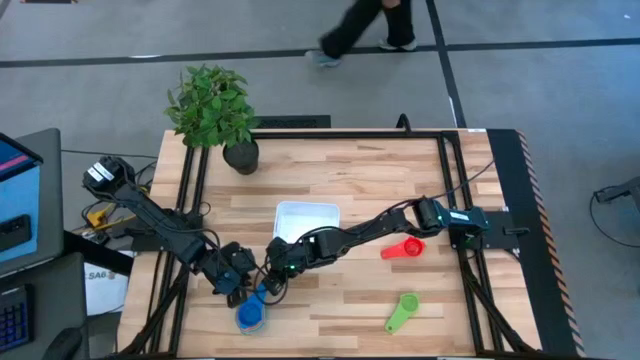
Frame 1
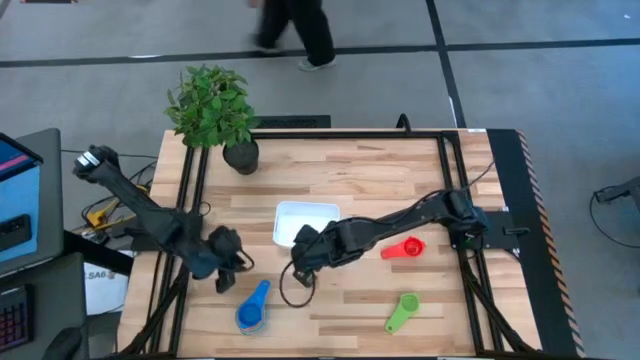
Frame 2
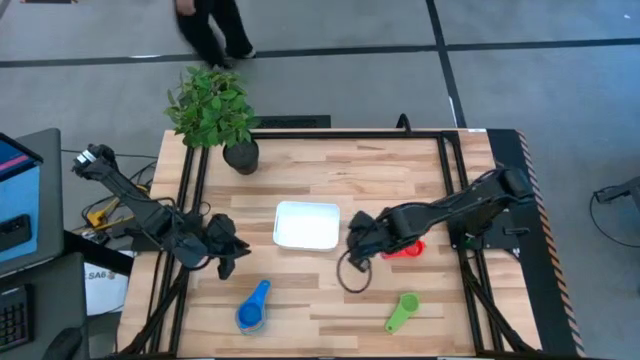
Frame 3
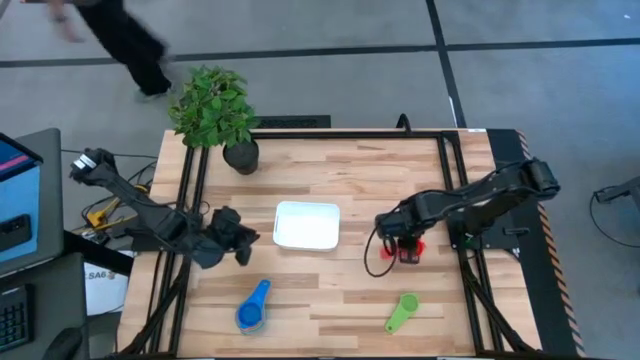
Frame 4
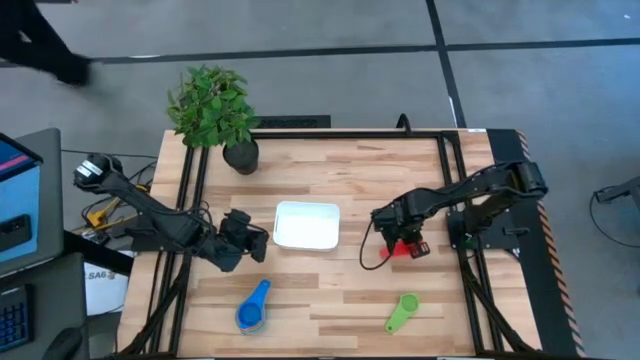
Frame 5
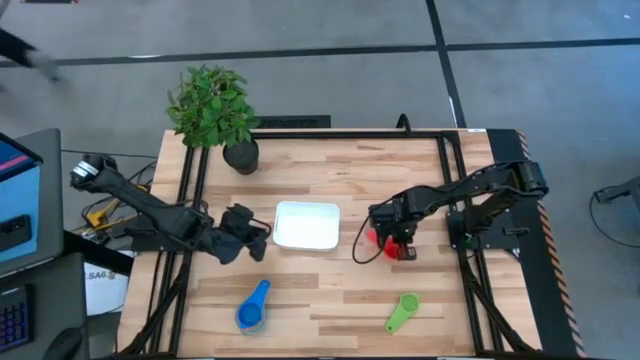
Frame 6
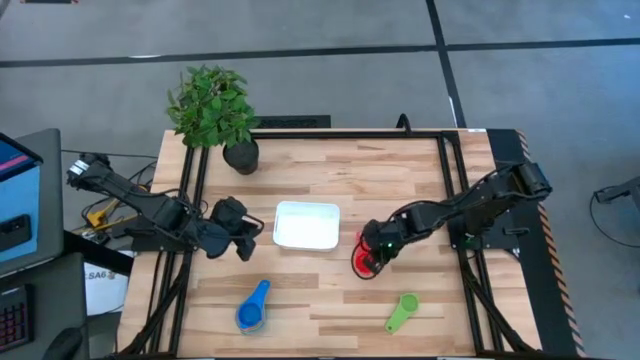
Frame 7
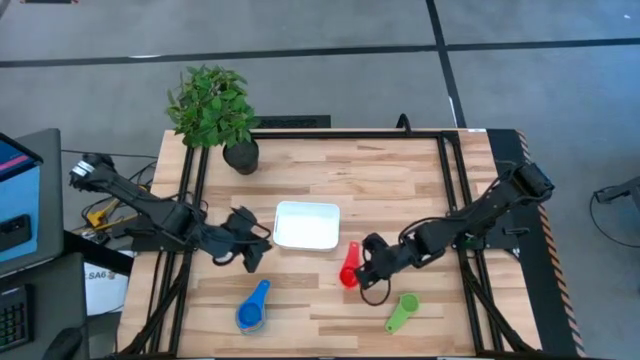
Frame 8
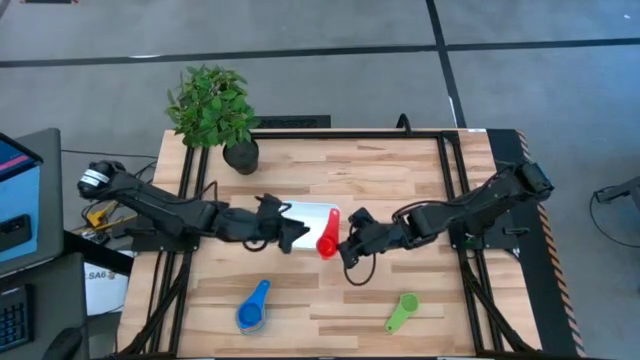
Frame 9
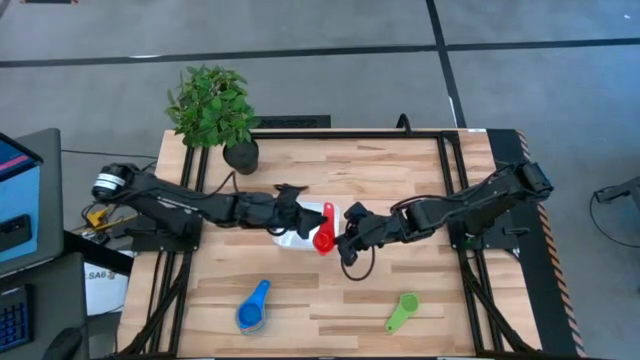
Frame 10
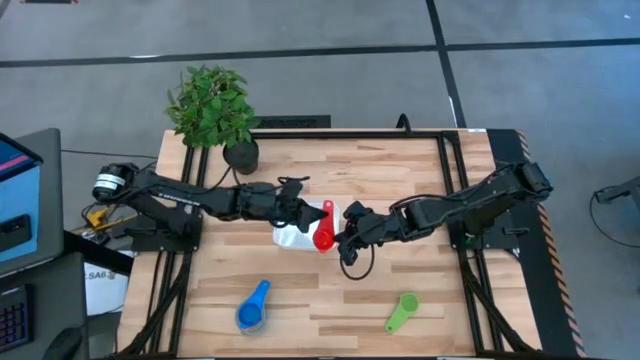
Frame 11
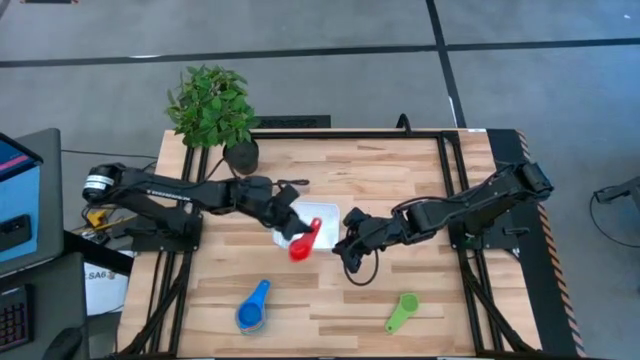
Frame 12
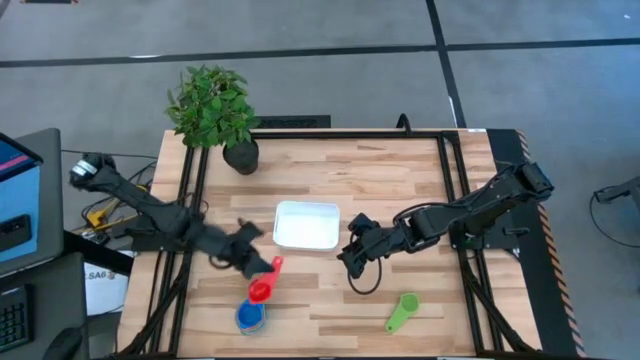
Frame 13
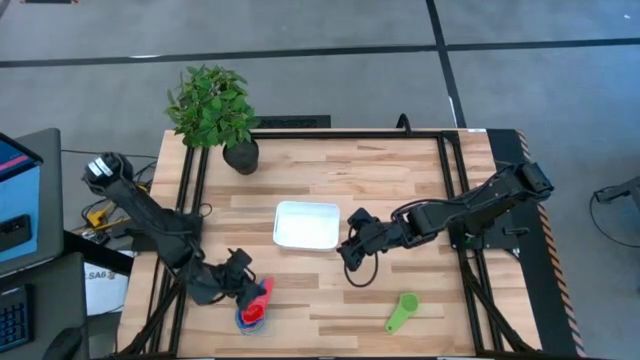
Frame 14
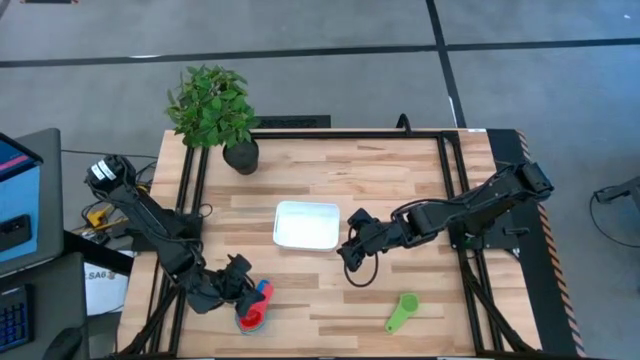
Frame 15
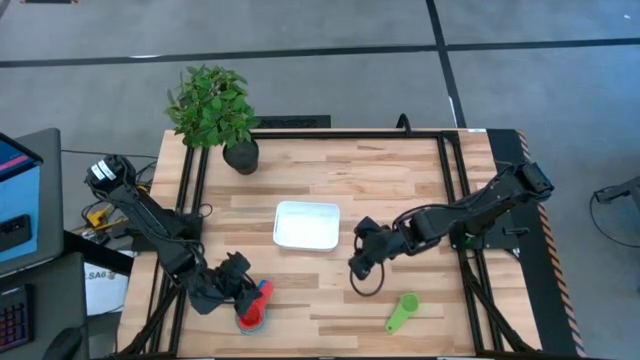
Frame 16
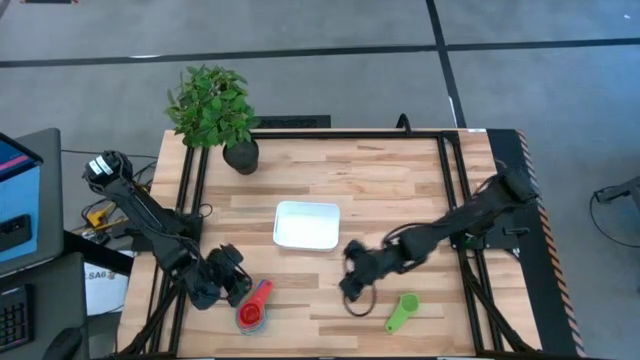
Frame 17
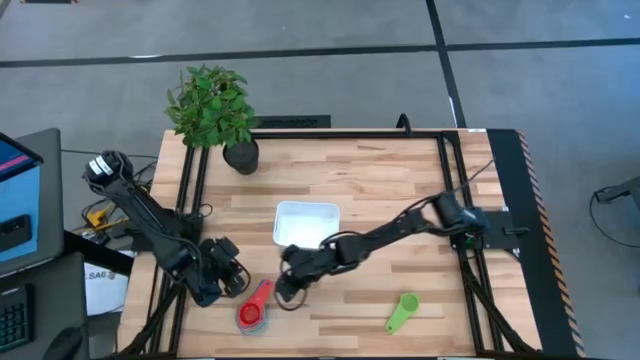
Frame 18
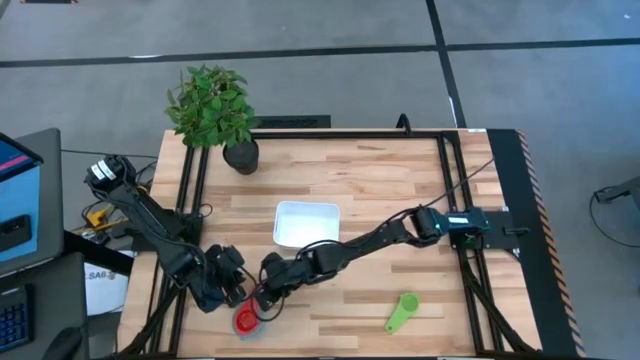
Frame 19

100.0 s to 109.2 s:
Task: Nest measuring cups in basket
Stack the red measuring cup into the light blue measuring cup

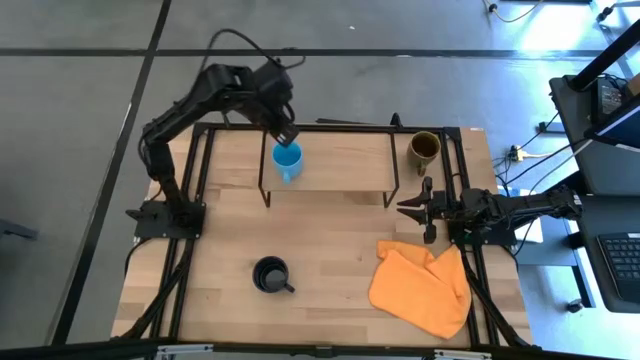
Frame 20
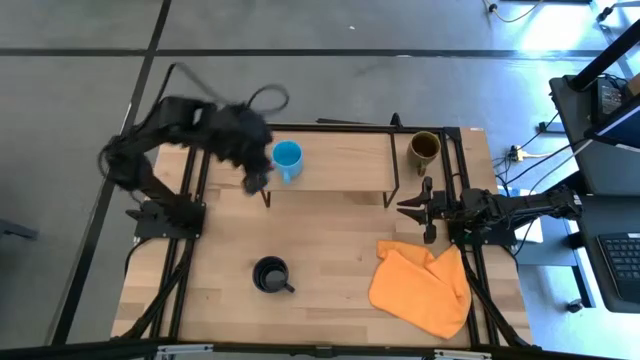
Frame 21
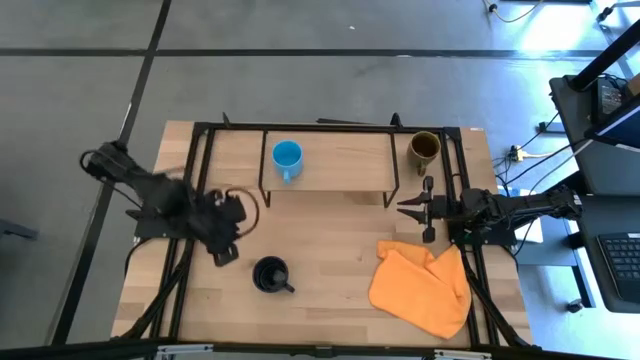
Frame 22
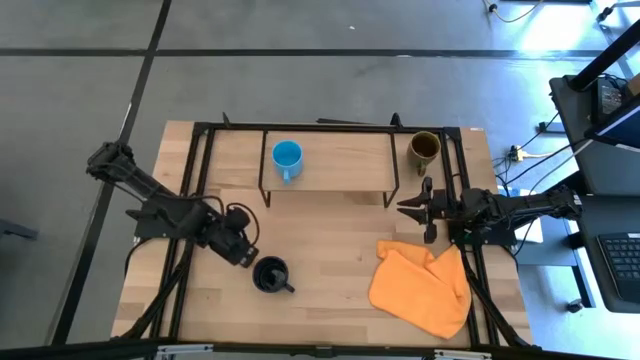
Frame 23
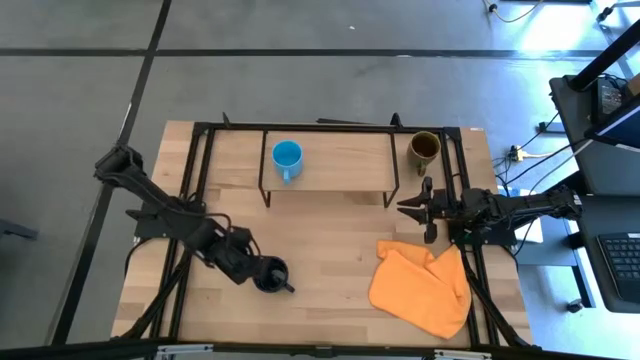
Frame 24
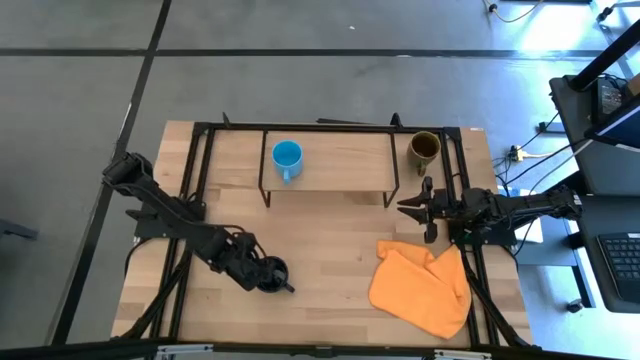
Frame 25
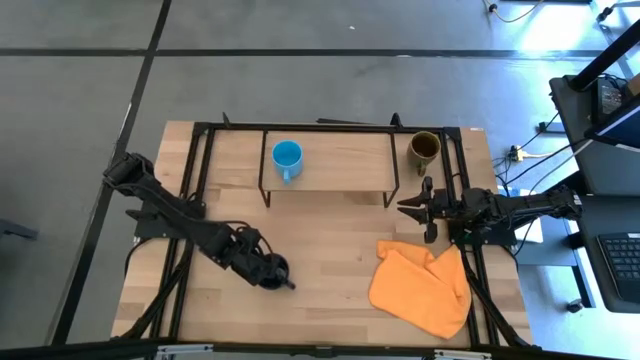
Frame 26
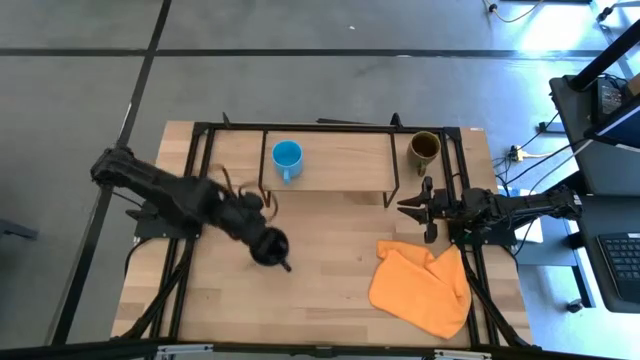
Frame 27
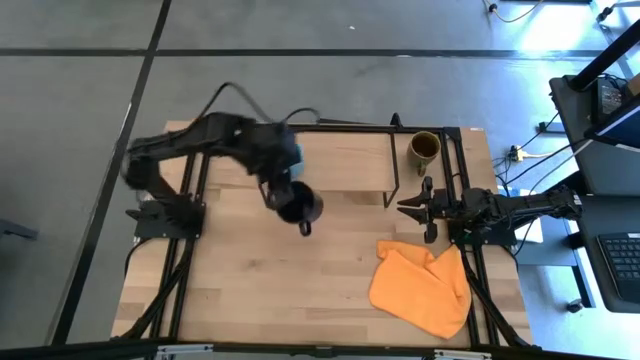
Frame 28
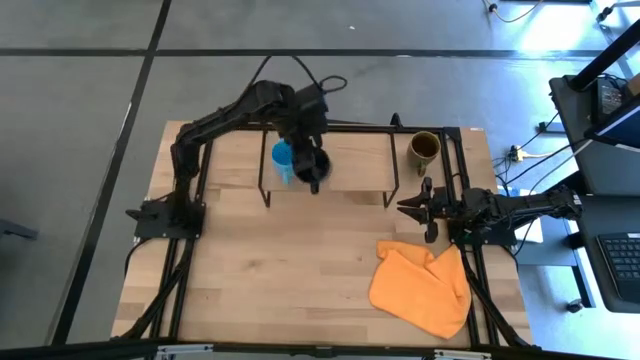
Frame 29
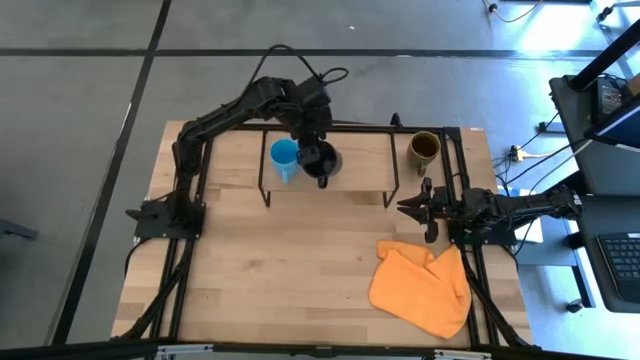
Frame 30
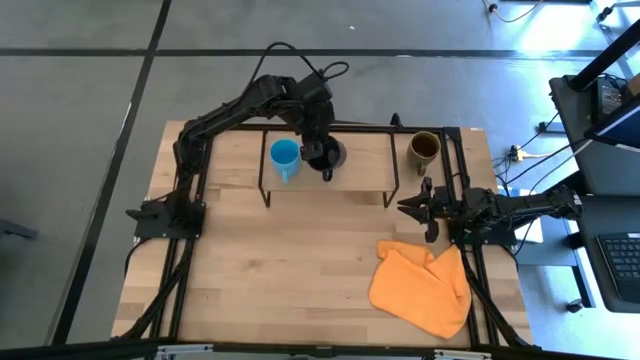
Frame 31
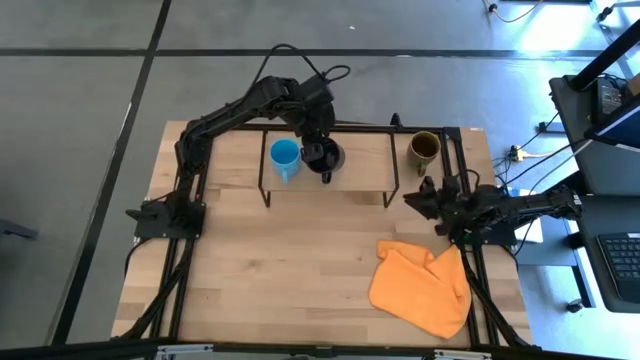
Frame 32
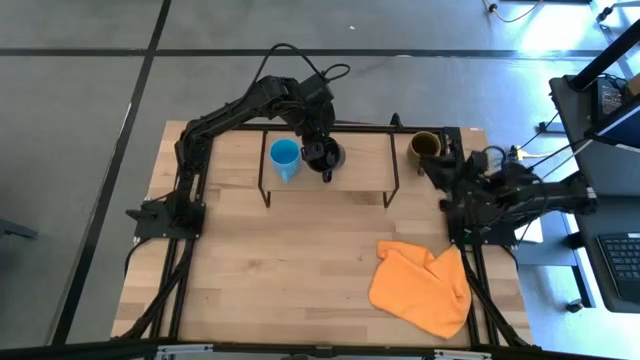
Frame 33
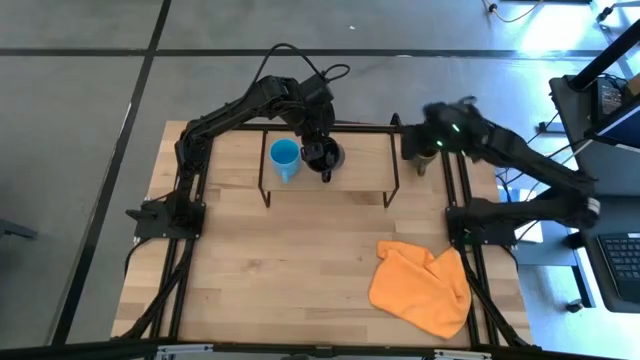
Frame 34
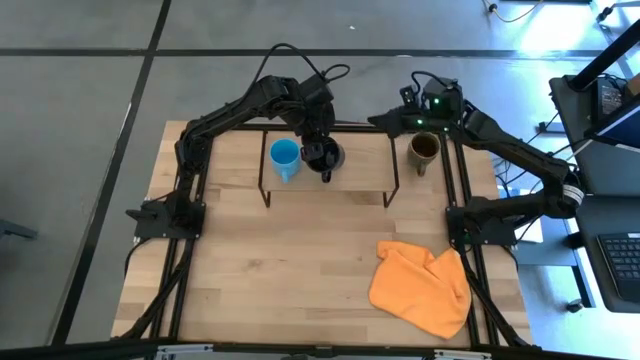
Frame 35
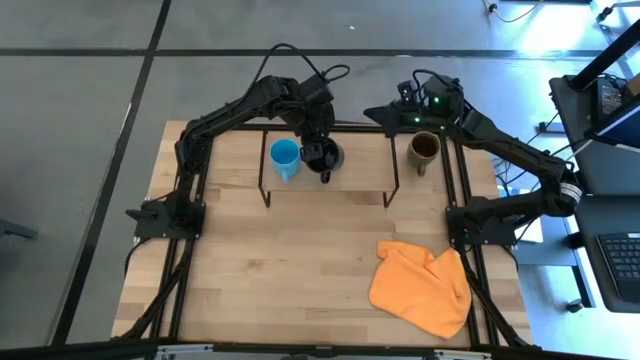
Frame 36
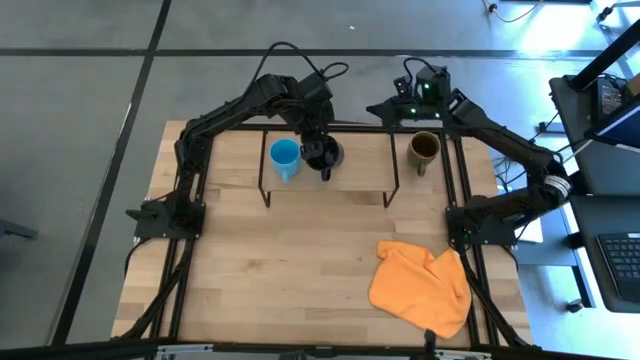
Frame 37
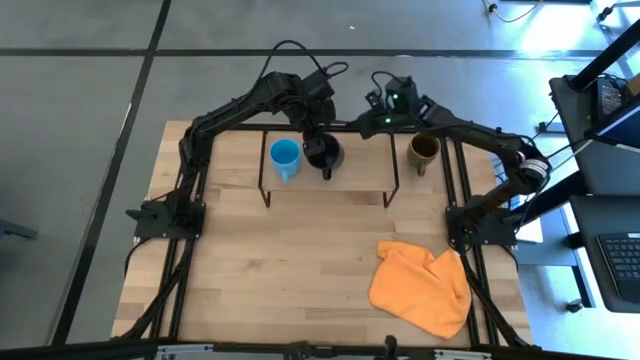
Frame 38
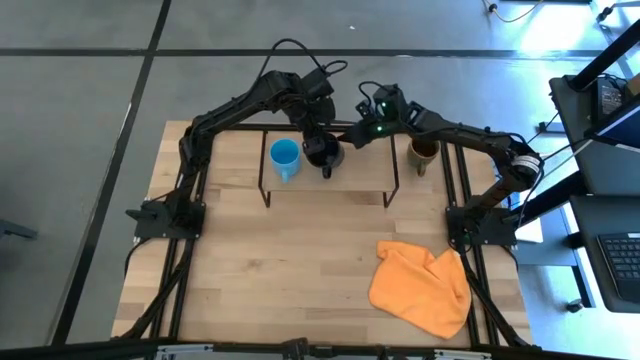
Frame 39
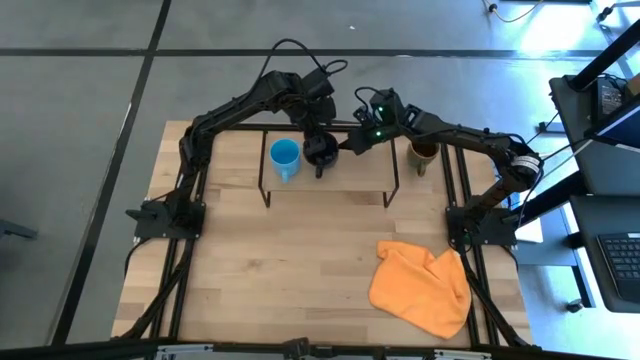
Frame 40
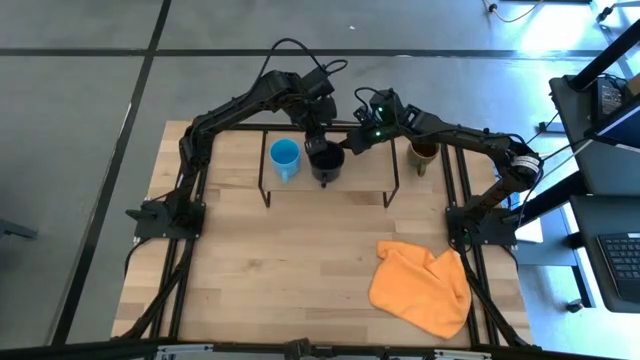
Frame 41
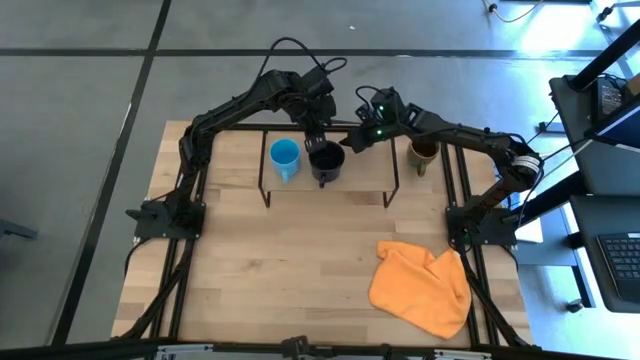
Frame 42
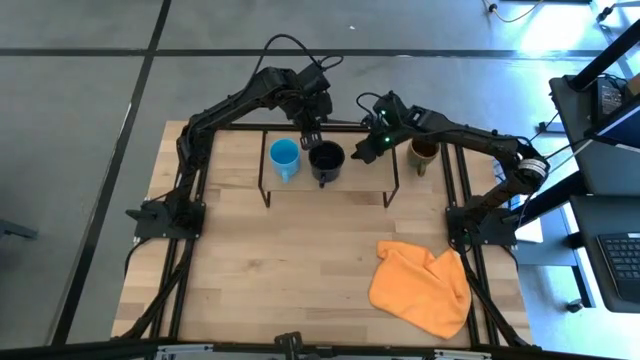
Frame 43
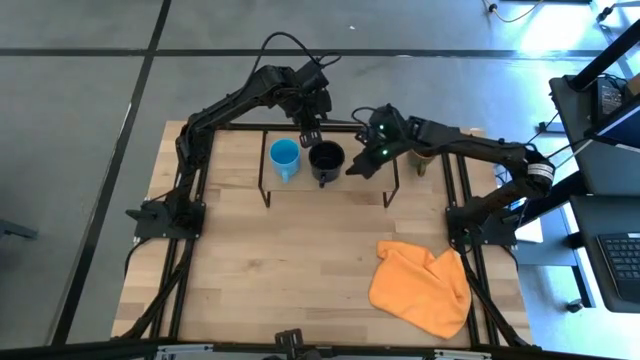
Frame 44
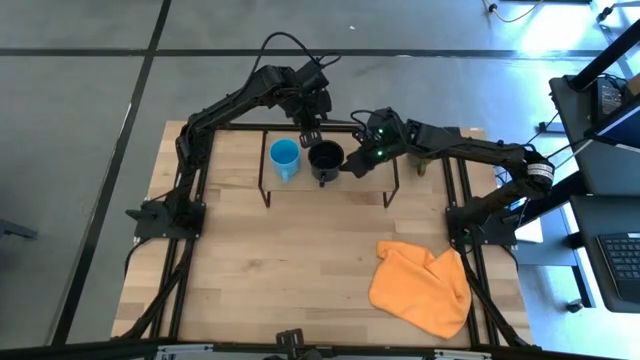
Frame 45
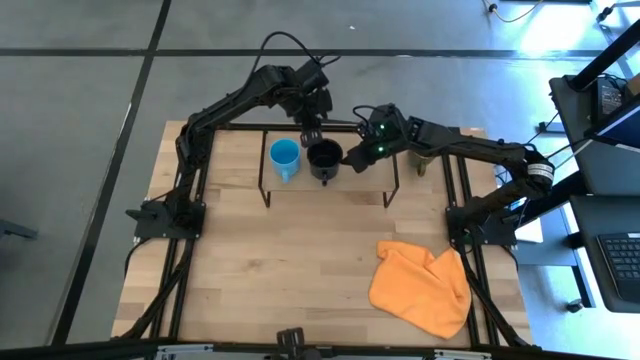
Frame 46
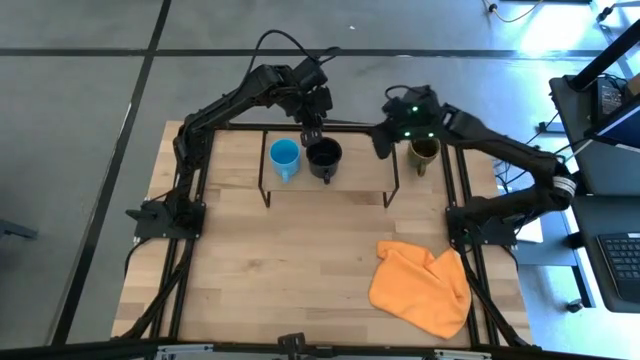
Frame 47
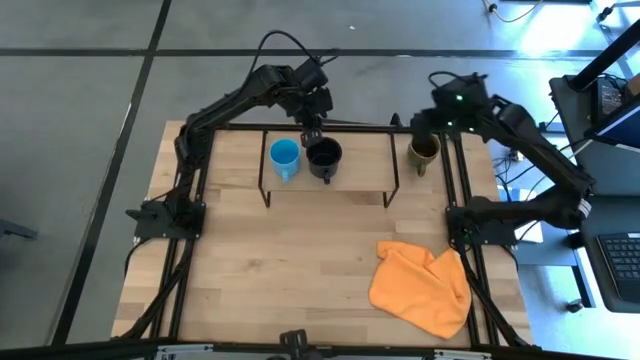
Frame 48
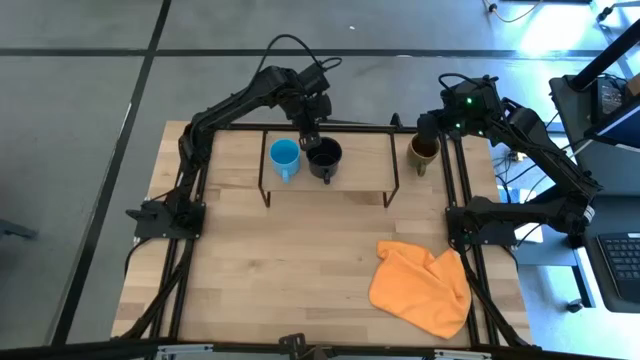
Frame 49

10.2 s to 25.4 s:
Task: Stack small to large cups/mugs on shelf
Put the dark blue mug on the shelf
